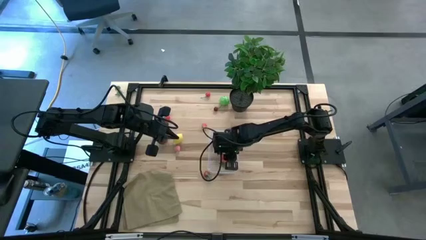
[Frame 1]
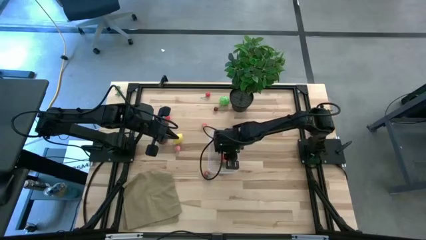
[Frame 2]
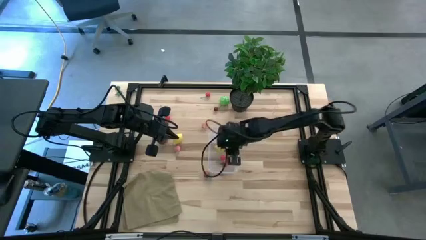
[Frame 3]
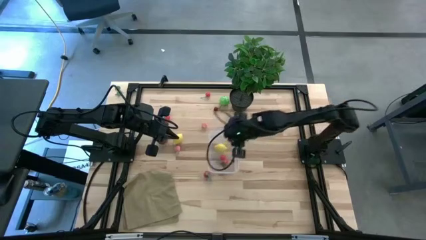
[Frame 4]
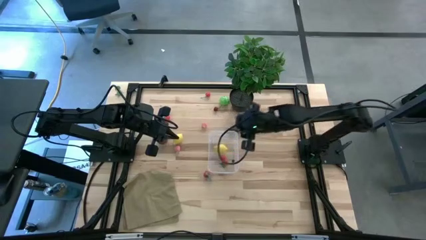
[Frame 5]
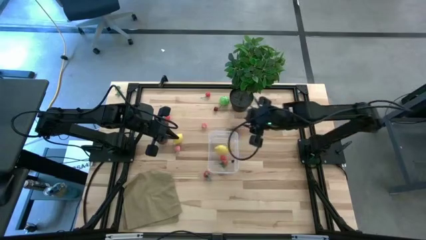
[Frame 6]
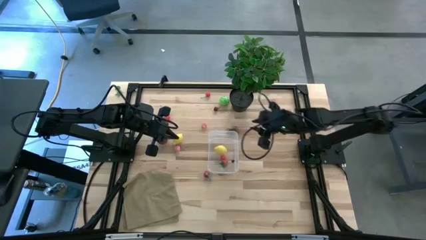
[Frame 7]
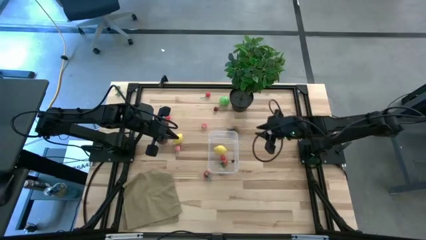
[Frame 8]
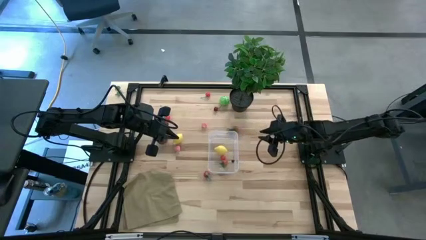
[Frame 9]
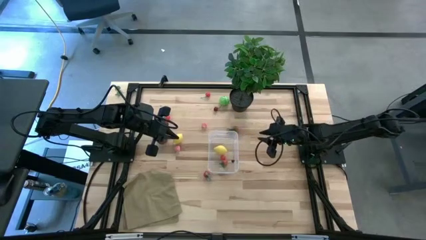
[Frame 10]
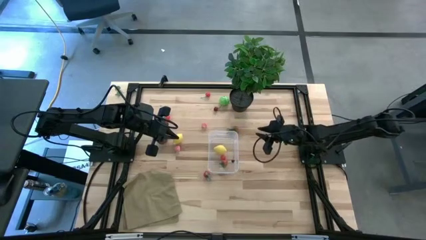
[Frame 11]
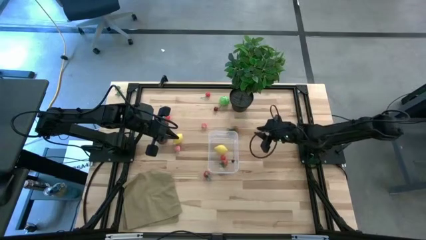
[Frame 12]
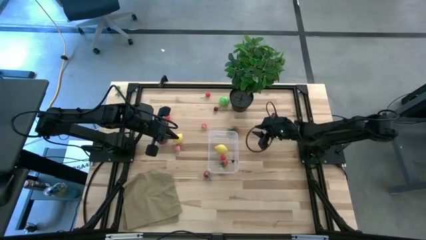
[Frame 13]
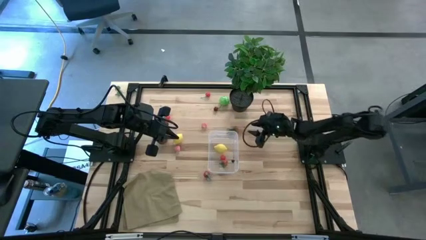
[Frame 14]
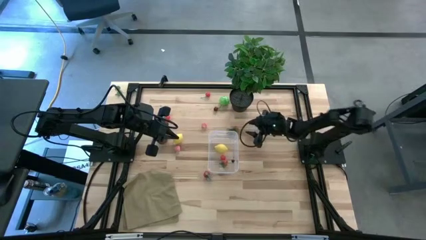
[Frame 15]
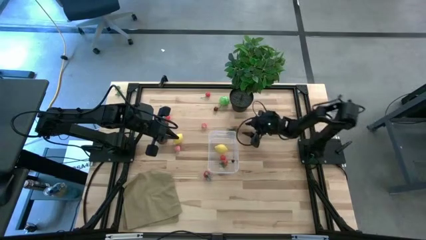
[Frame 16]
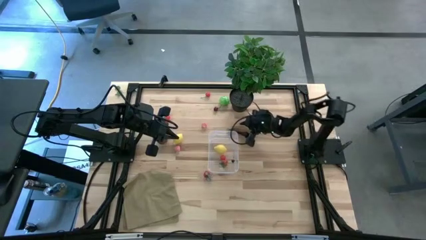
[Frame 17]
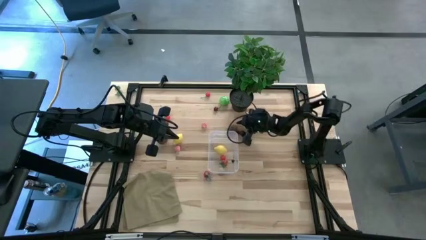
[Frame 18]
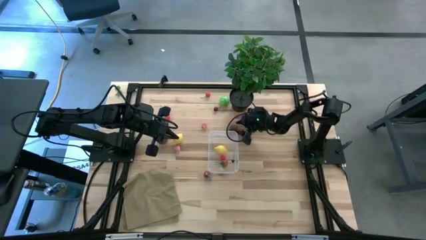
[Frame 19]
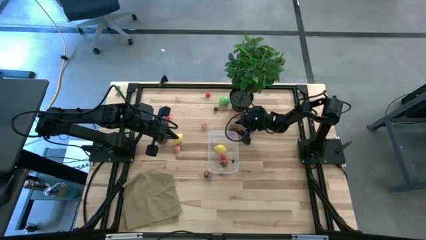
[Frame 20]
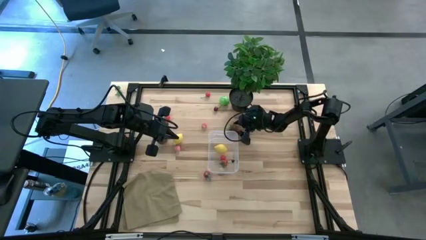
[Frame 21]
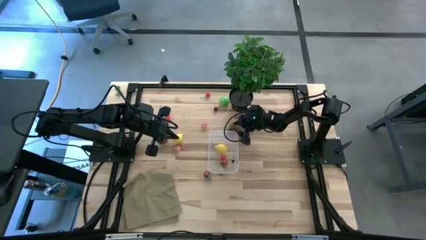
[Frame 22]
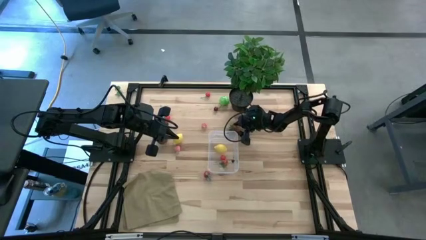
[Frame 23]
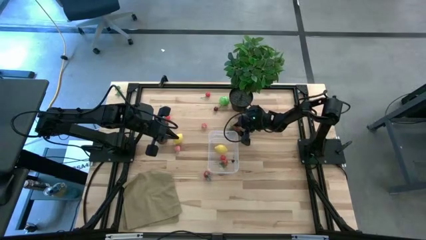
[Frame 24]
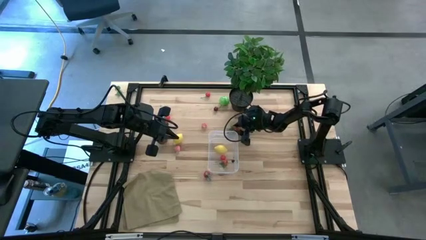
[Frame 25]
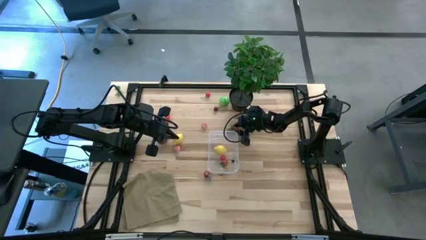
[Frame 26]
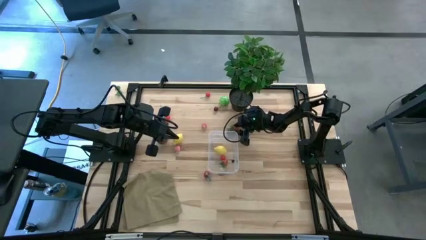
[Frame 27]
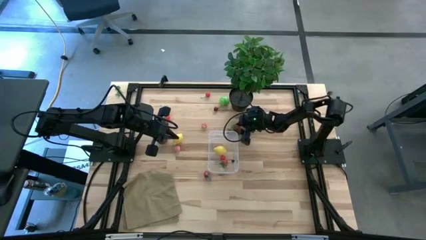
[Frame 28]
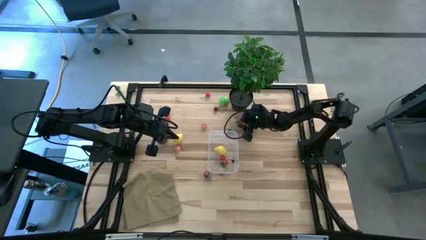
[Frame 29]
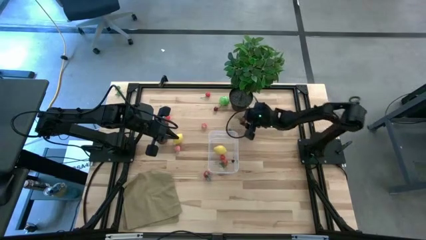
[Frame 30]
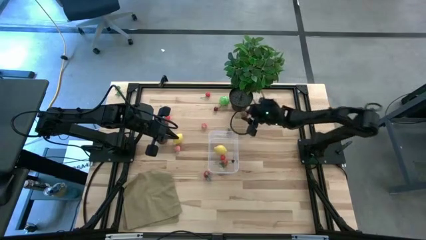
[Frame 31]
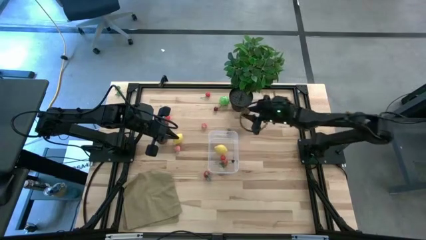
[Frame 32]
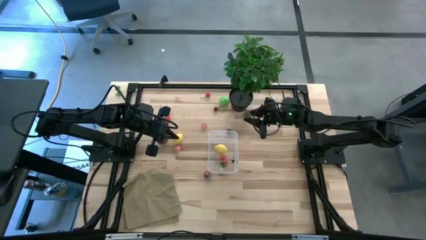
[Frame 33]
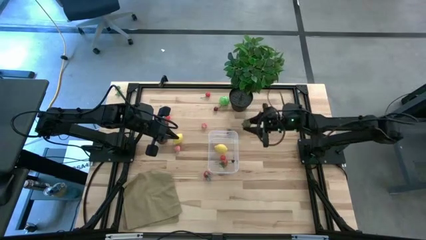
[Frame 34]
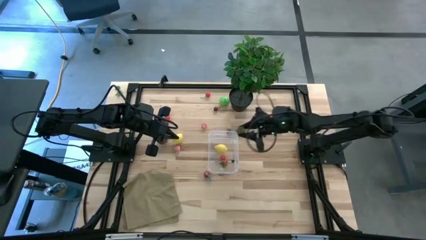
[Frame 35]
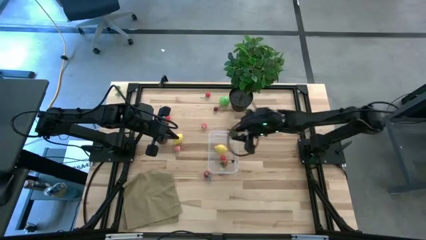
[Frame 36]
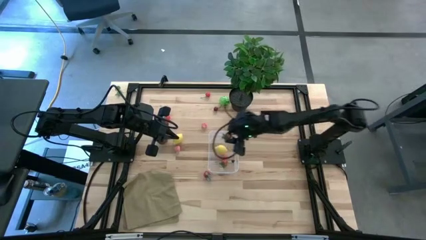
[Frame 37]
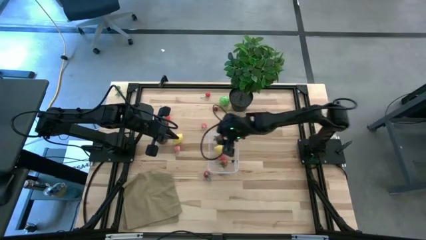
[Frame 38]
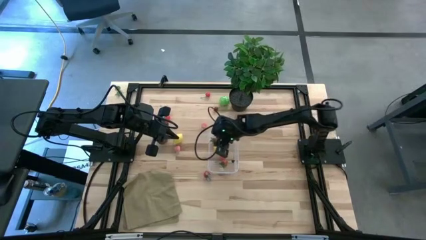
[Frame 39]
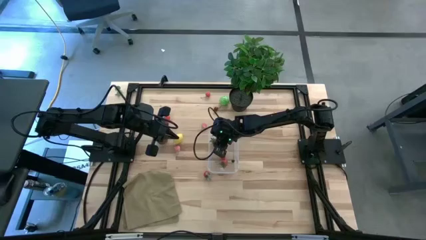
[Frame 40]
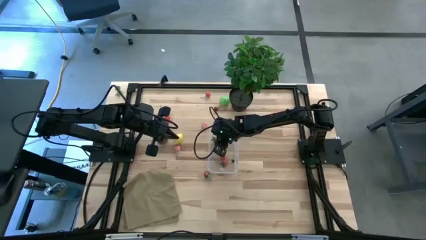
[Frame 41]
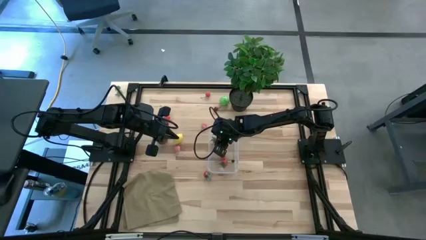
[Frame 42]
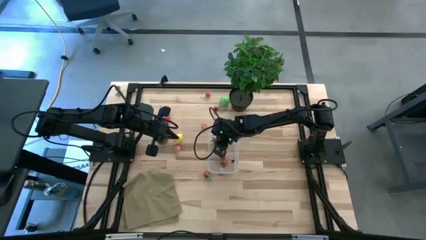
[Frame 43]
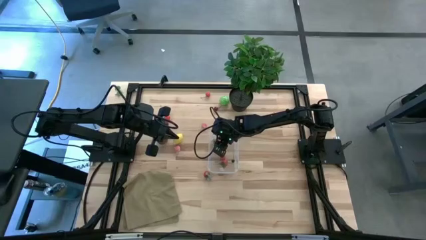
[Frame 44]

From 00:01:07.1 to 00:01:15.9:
Task: Pick and placing Produce into tupperware
Put the red strawberry into the transparent container

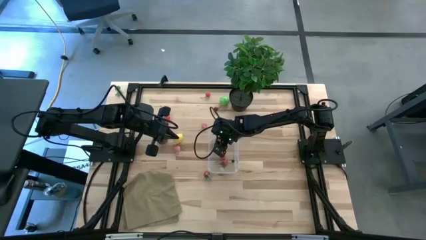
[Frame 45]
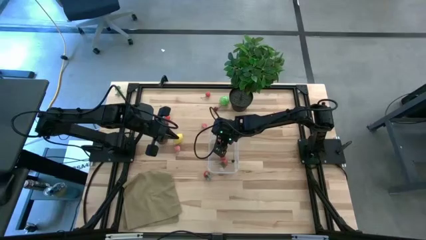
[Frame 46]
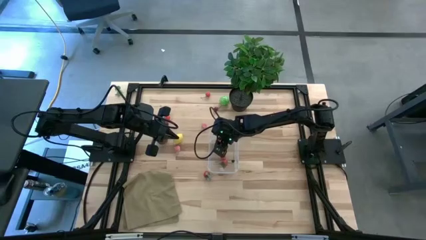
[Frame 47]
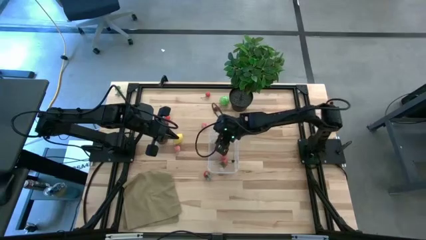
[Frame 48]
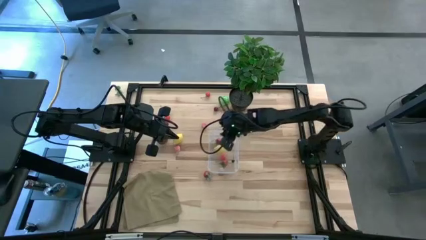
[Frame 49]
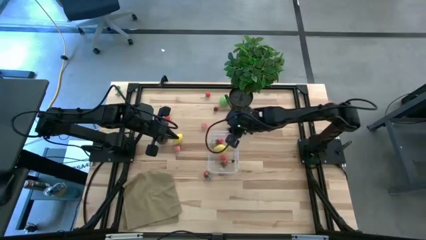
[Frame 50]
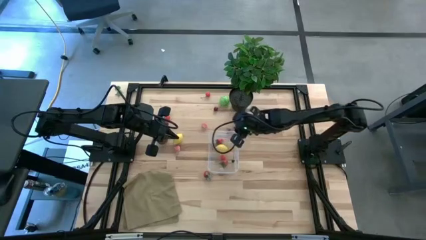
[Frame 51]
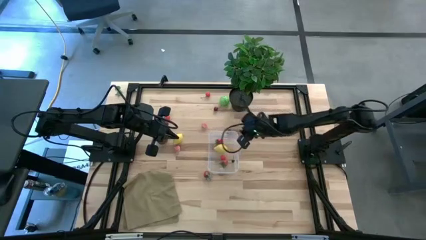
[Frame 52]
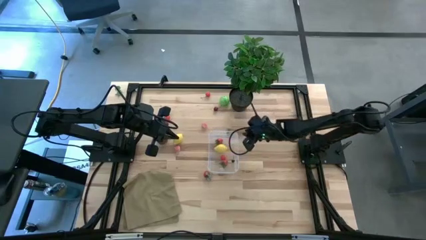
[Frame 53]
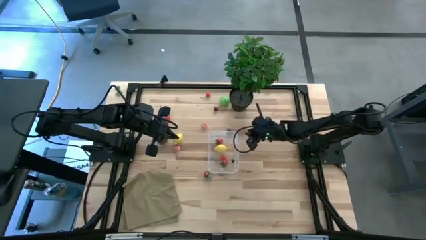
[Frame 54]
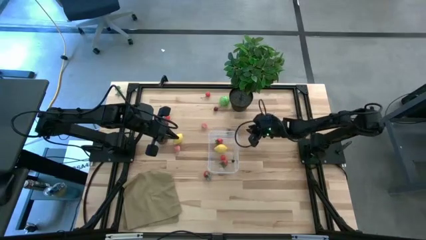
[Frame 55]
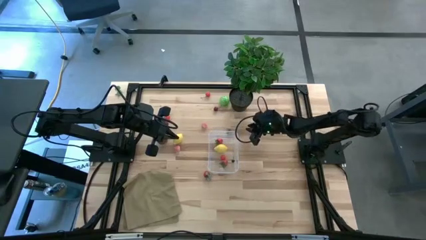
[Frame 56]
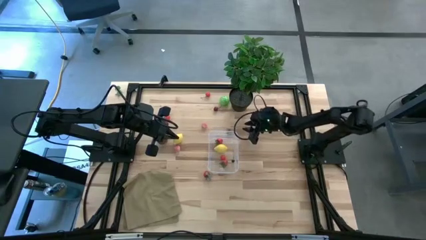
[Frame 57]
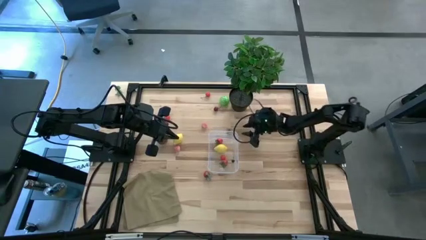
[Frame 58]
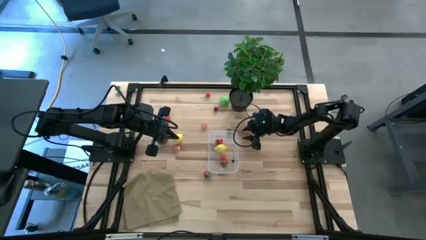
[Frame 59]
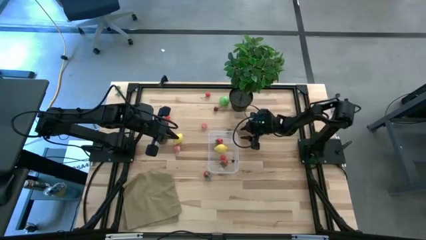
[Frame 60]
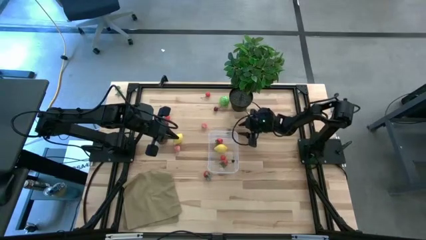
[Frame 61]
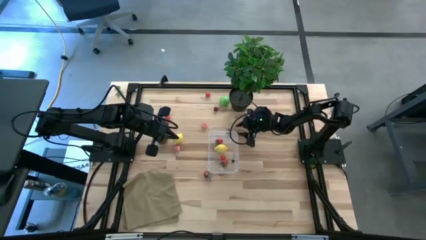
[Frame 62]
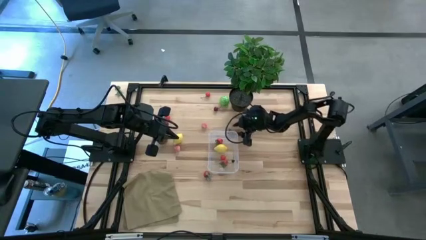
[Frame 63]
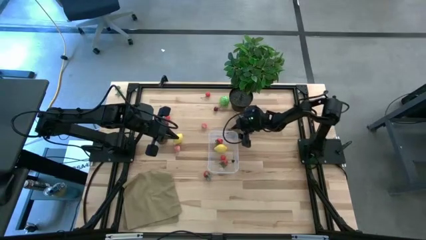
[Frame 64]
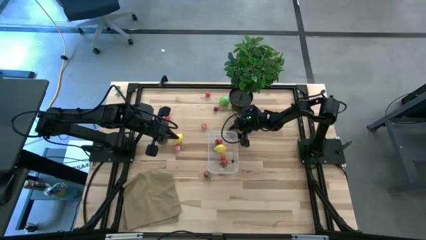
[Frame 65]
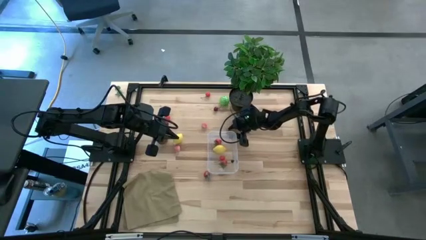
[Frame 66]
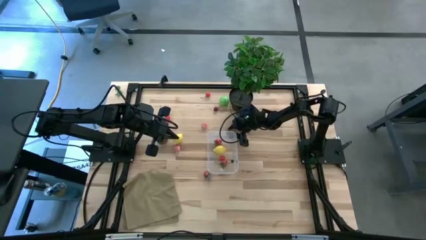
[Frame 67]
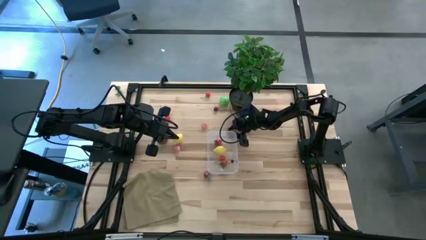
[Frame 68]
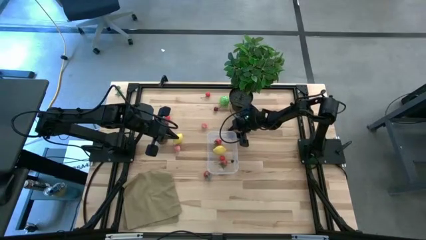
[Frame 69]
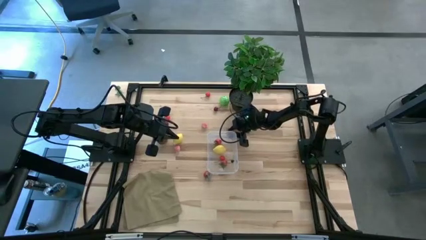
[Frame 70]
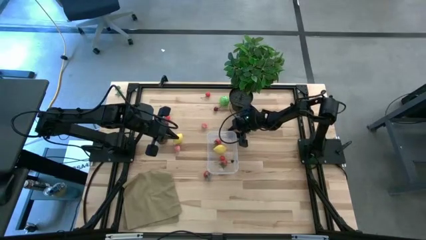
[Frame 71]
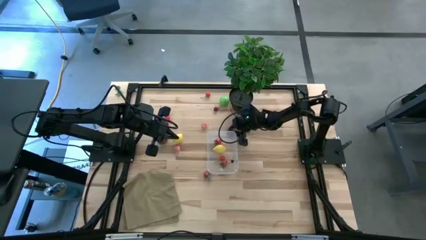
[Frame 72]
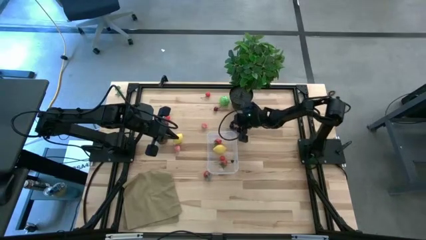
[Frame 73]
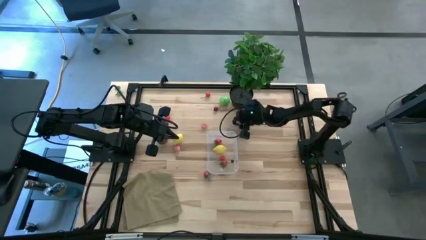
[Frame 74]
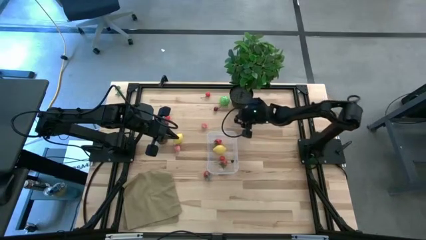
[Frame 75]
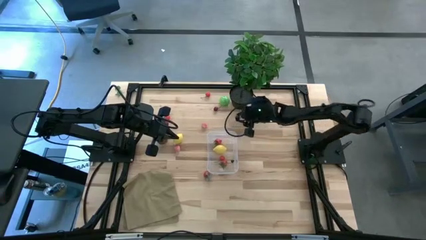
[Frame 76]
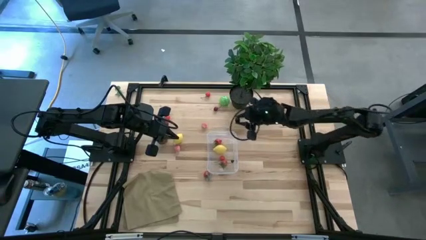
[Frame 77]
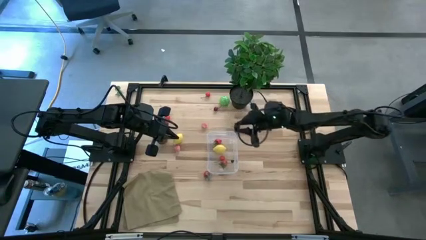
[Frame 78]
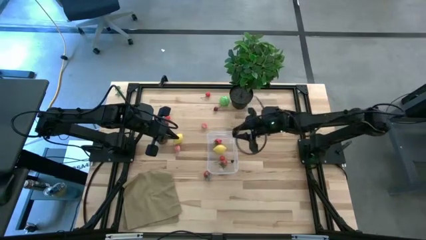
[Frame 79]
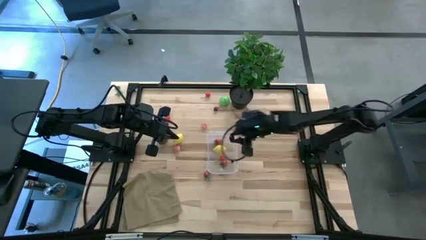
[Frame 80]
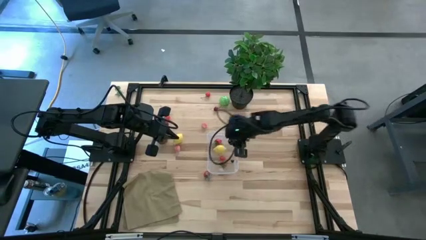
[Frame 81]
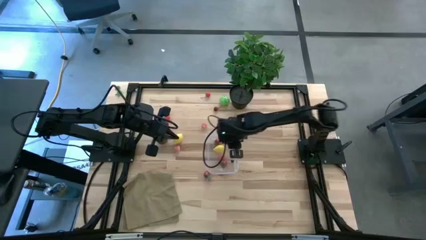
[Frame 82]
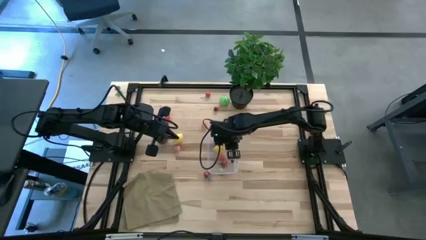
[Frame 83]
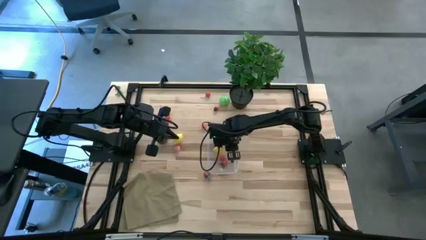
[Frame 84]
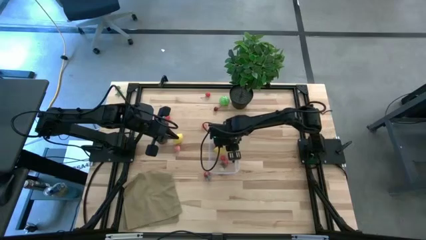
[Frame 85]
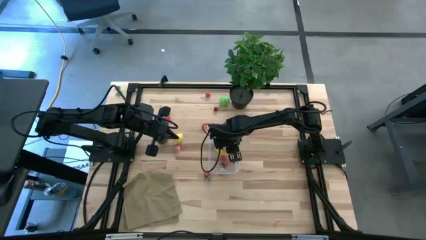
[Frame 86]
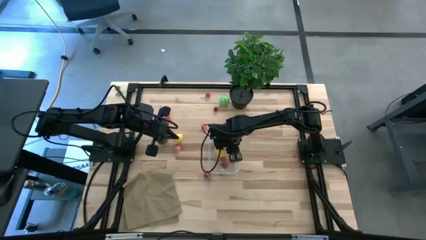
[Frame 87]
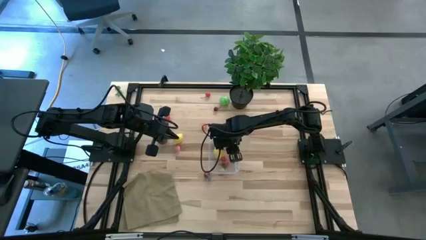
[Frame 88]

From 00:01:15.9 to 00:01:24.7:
Put the blackberry into the transparent container
